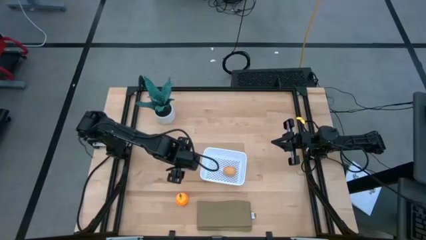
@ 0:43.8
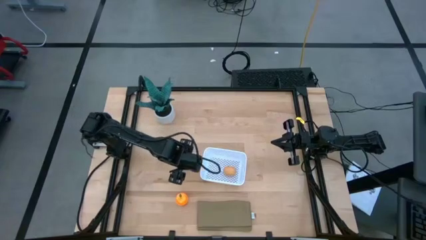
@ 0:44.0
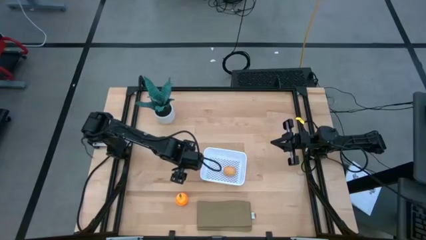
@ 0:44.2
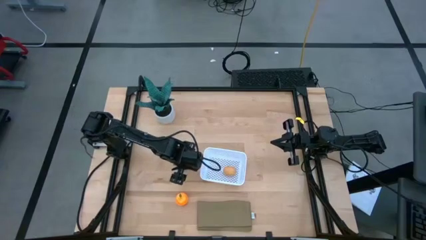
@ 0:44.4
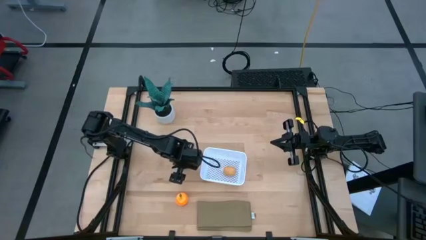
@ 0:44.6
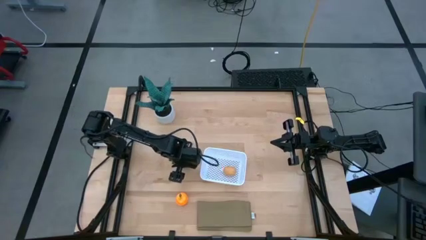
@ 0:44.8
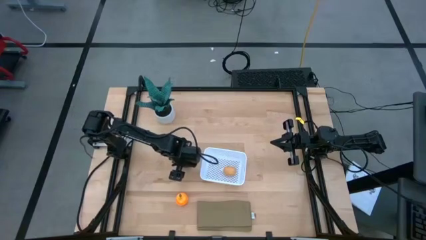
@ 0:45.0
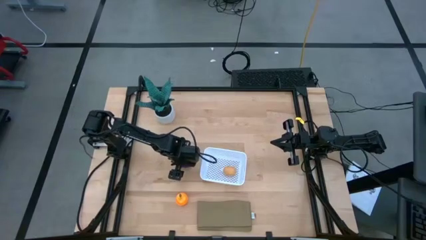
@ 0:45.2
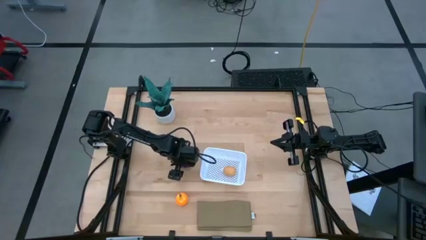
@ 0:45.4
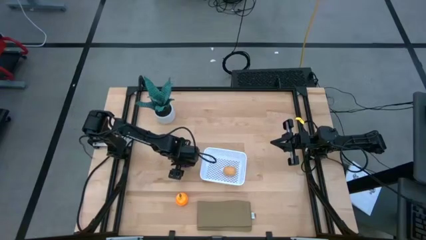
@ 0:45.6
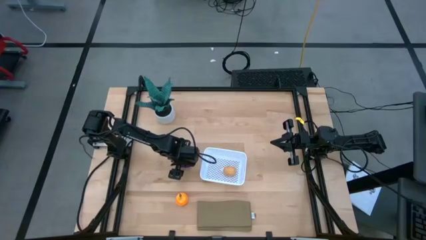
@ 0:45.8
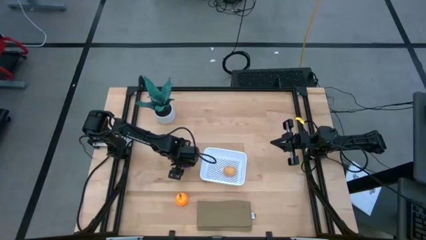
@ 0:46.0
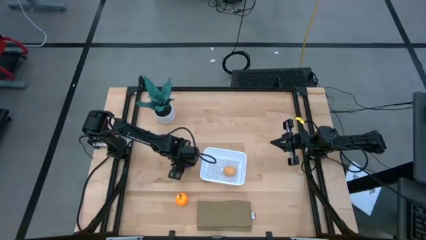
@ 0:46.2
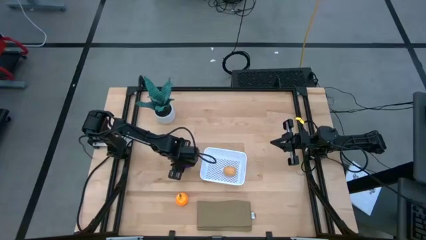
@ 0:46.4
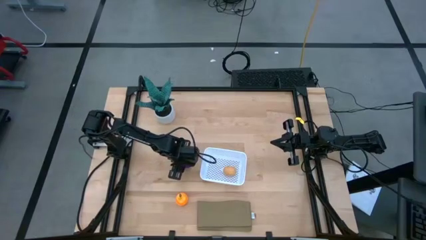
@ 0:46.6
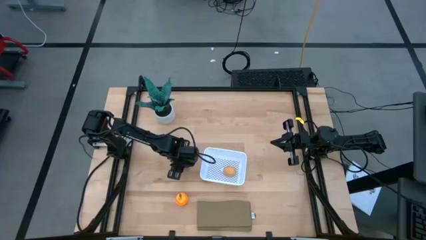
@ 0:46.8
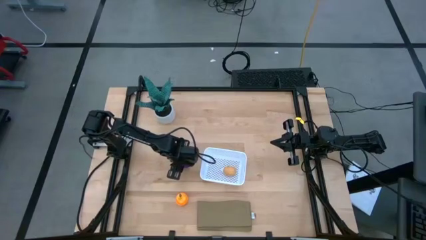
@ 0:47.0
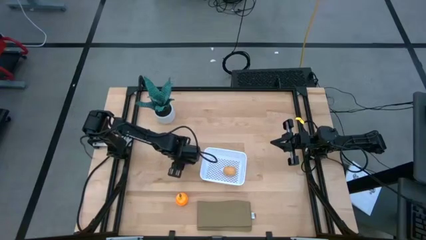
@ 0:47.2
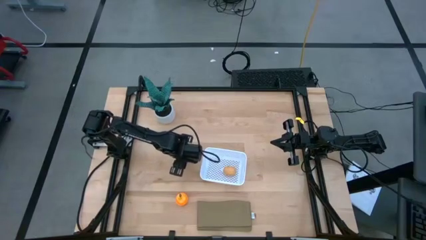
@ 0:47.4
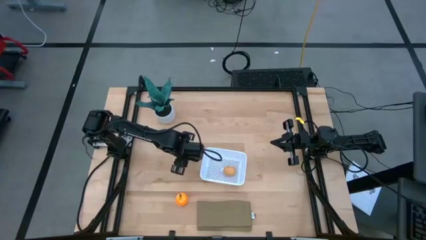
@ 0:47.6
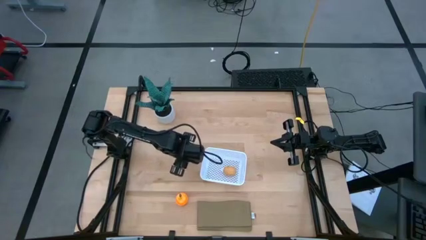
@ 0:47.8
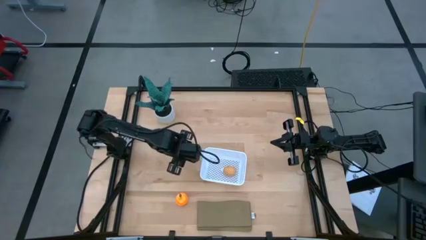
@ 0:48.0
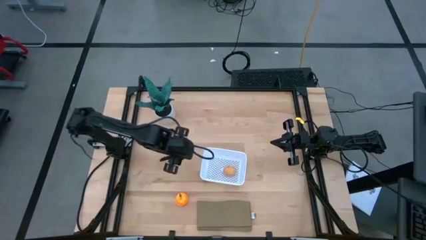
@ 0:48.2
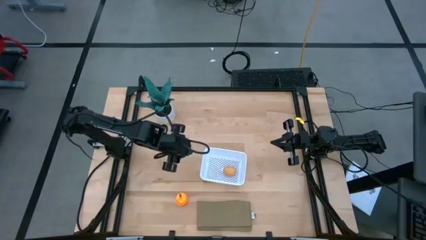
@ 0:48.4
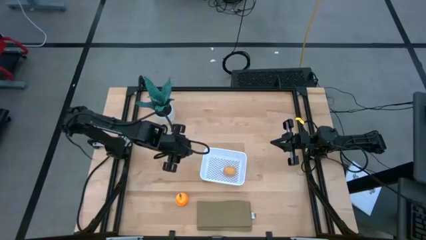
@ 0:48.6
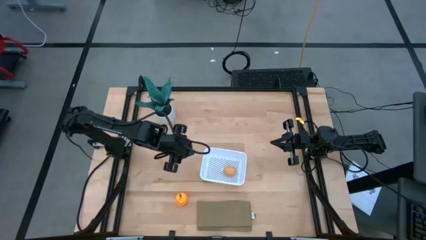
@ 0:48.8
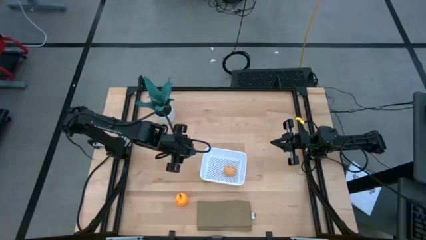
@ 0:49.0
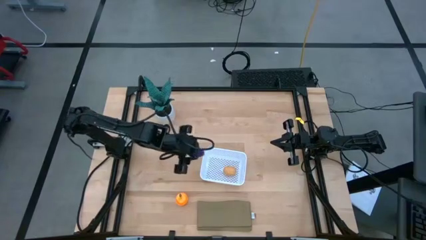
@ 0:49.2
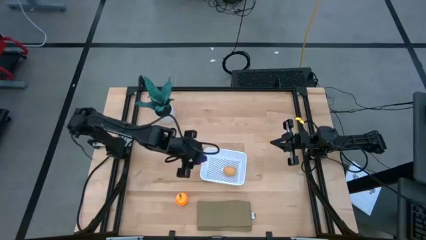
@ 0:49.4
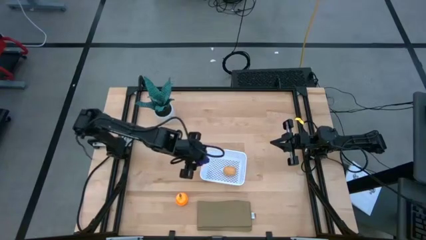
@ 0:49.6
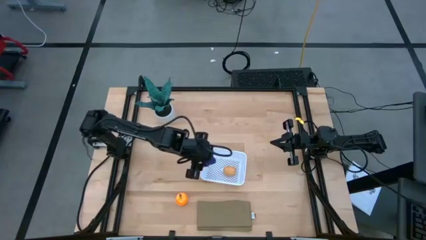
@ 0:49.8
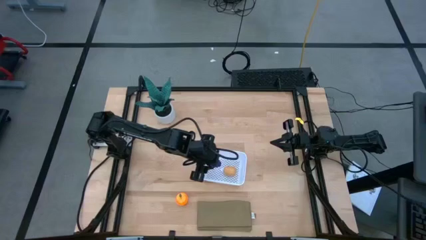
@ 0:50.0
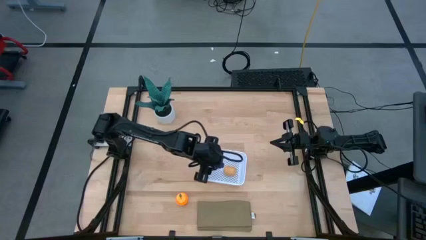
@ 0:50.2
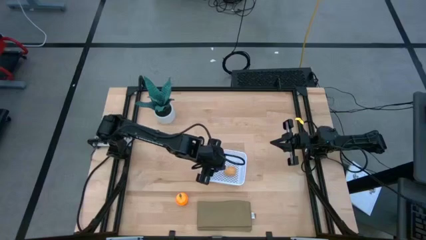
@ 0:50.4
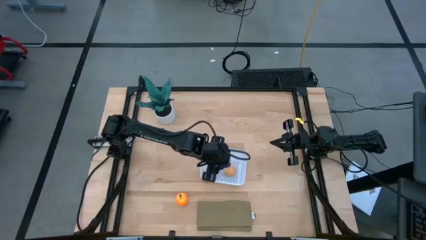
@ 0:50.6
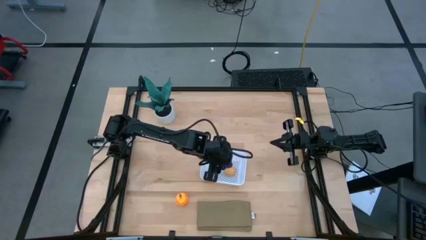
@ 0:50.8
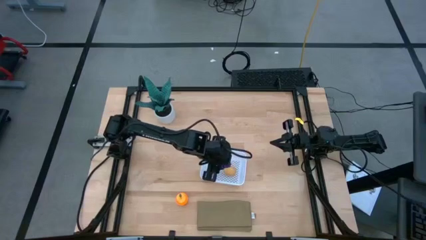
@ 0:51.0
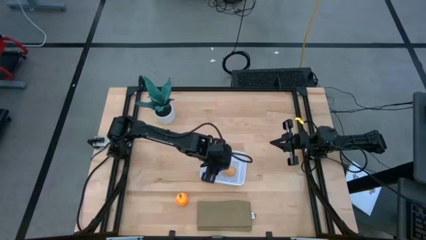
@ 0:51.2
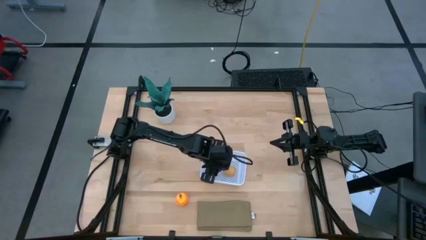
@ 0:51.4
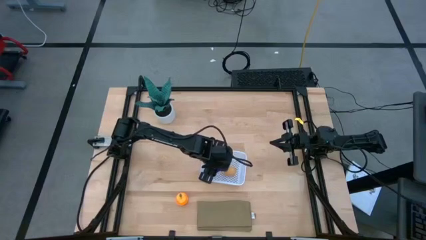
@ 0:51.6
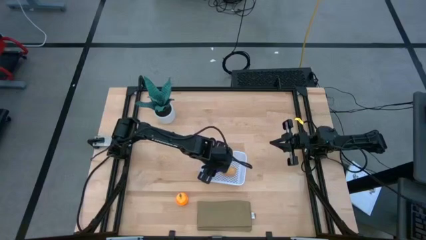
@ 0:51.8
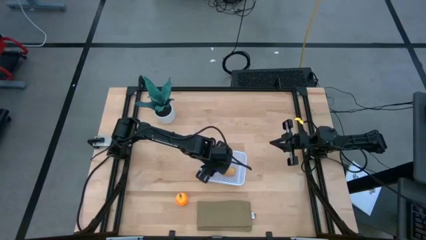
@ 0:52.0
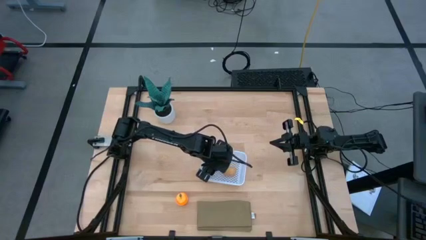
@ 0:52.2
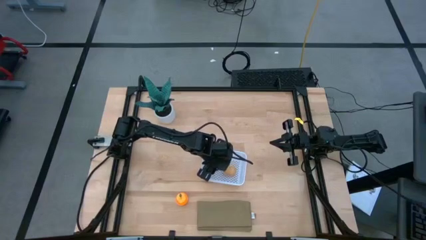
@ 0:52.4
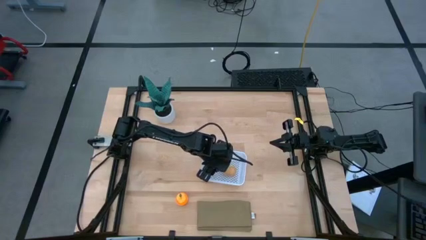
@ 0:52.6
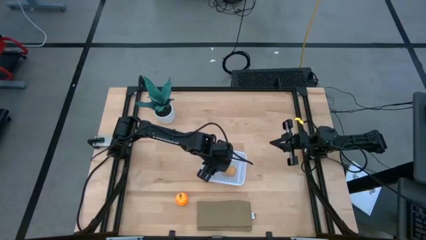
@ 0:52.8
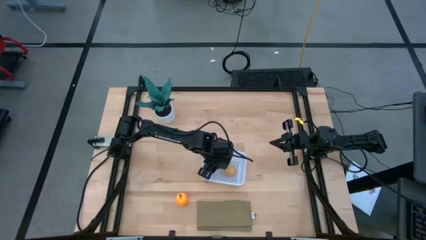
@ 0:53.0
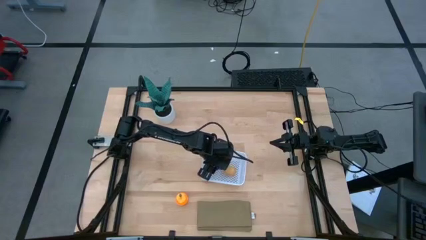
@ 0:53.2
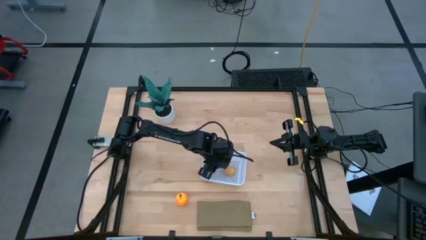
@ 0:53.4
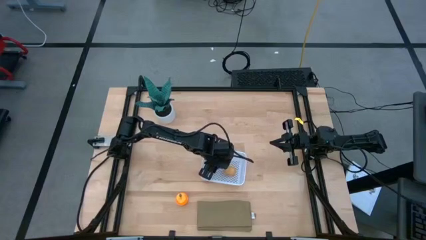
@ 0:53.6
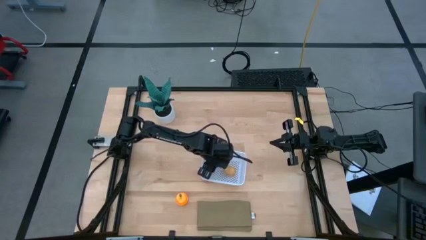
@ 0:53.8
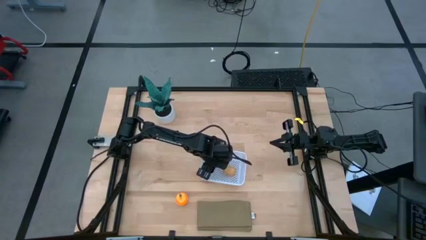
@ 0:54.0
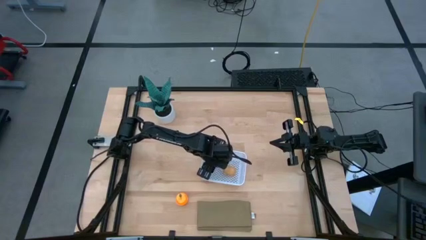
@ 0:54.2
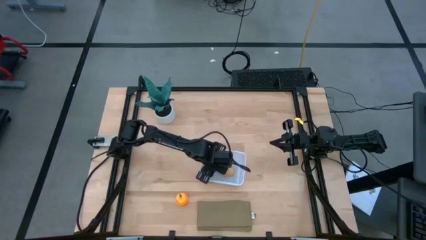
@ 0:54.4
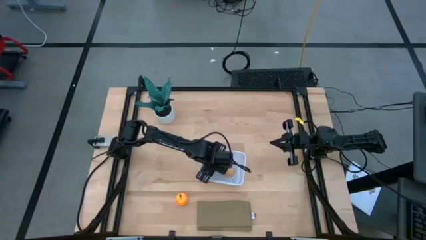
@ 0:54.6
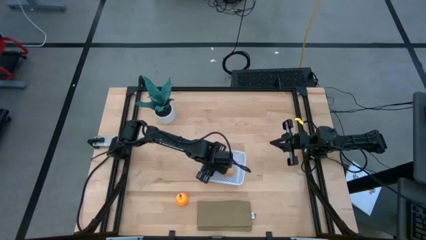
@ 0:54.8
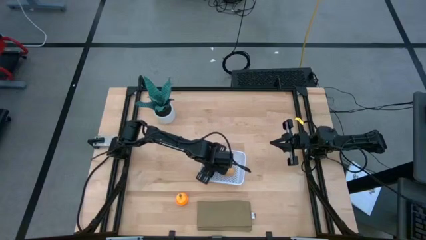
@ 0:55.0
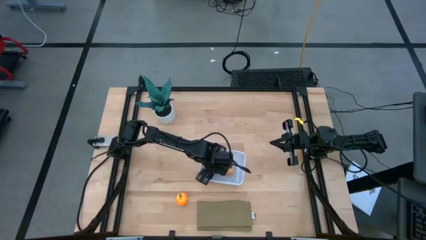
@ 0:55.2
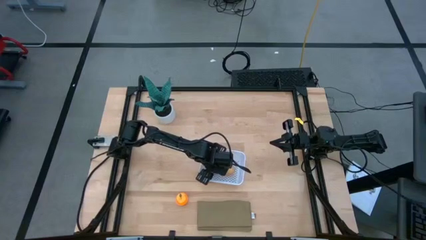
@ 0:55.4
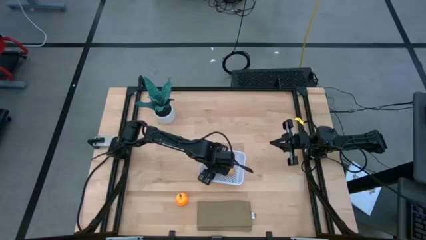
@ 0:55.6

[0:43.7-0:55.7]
Task: Pick and placing Produce into tupperware
Put the grapes into the white basket

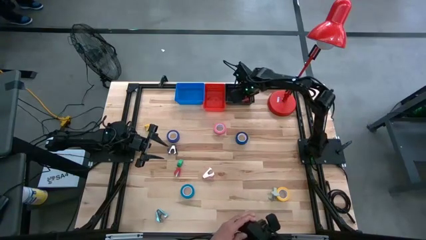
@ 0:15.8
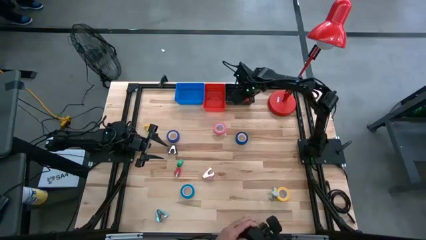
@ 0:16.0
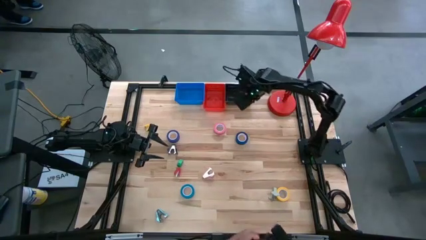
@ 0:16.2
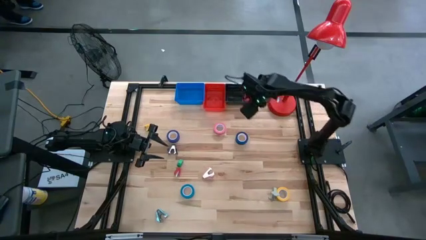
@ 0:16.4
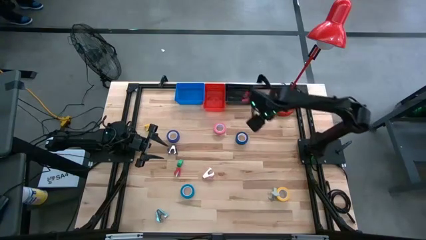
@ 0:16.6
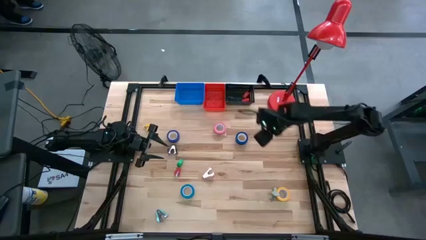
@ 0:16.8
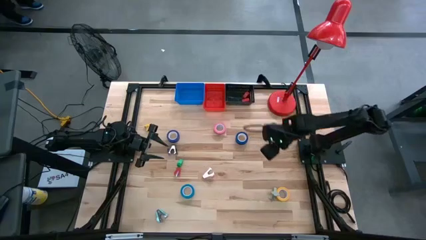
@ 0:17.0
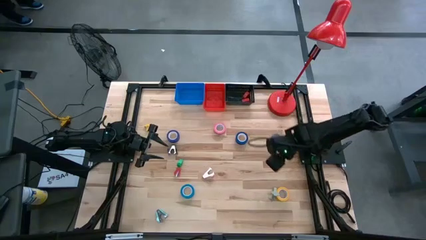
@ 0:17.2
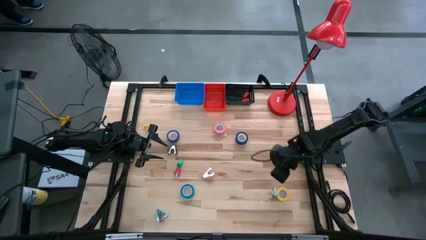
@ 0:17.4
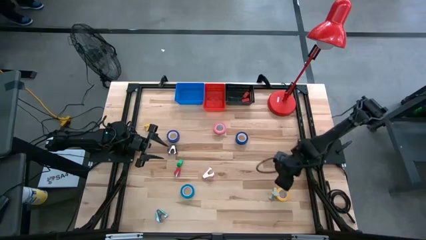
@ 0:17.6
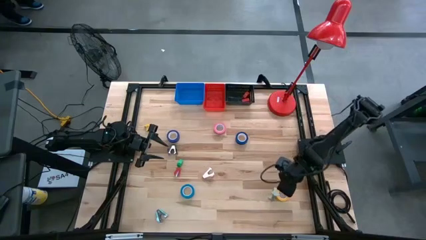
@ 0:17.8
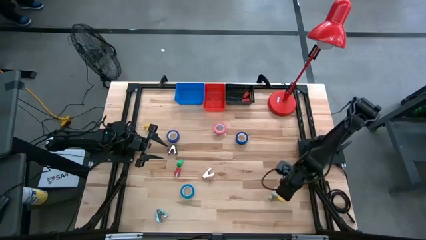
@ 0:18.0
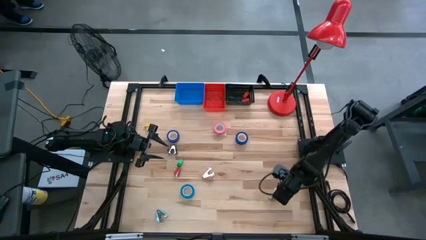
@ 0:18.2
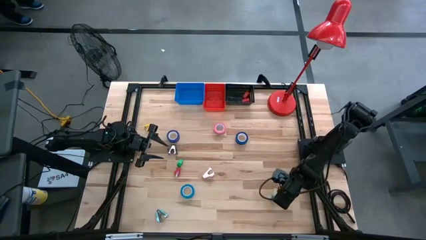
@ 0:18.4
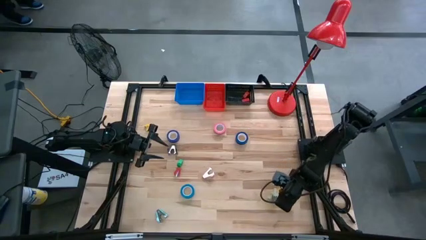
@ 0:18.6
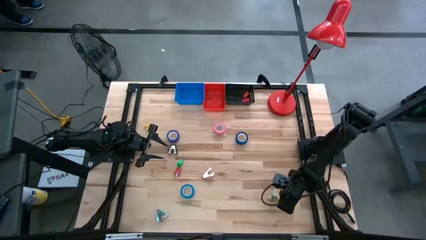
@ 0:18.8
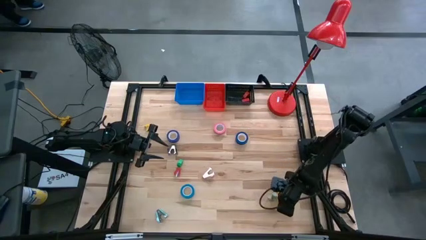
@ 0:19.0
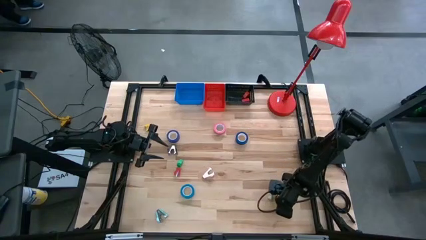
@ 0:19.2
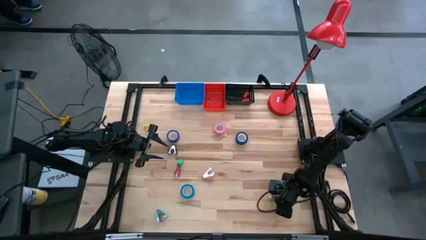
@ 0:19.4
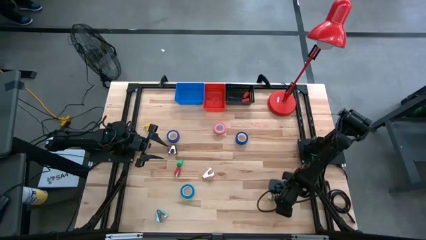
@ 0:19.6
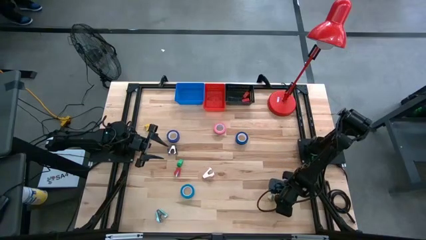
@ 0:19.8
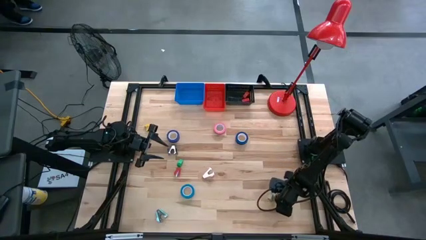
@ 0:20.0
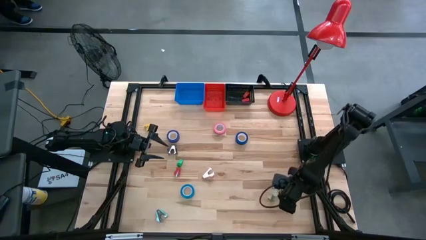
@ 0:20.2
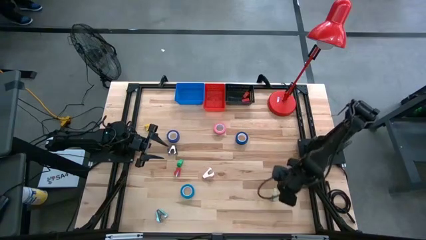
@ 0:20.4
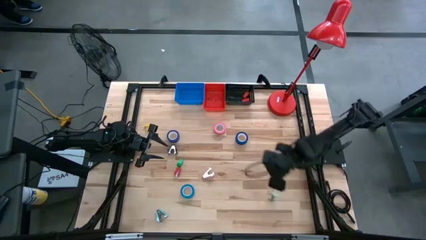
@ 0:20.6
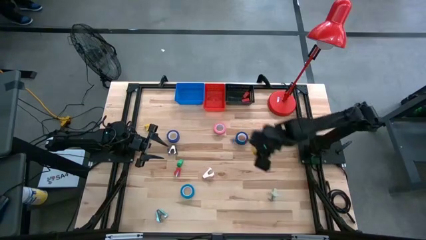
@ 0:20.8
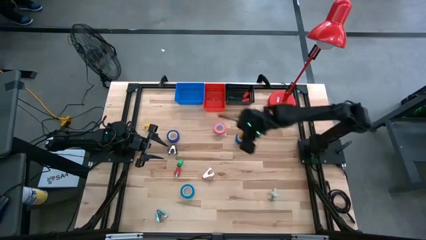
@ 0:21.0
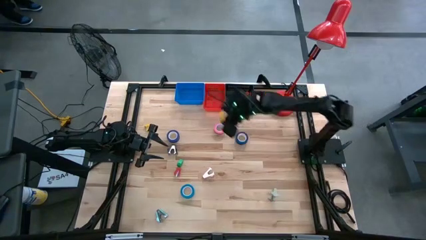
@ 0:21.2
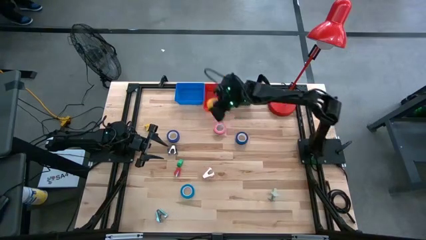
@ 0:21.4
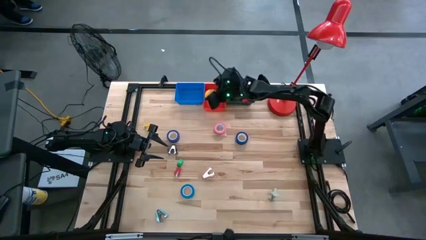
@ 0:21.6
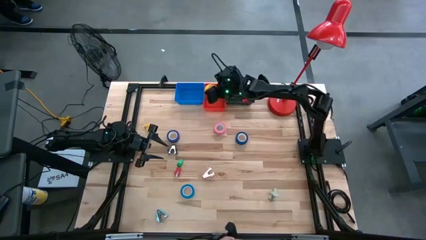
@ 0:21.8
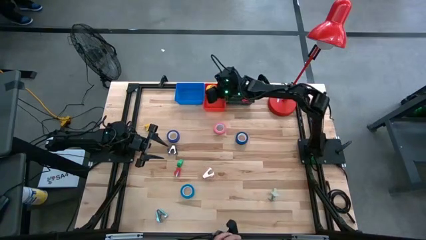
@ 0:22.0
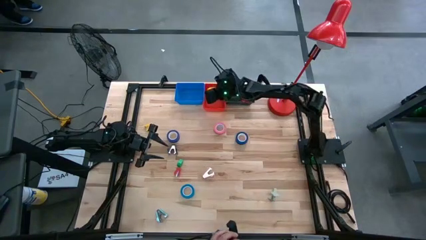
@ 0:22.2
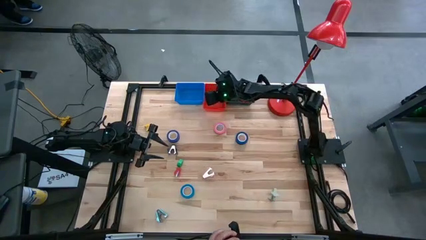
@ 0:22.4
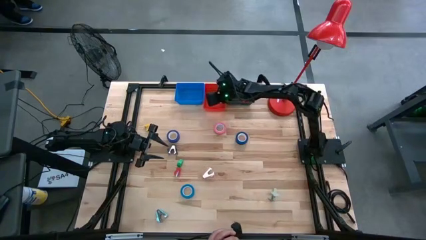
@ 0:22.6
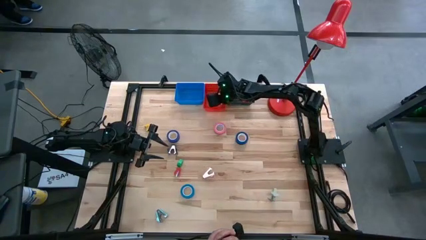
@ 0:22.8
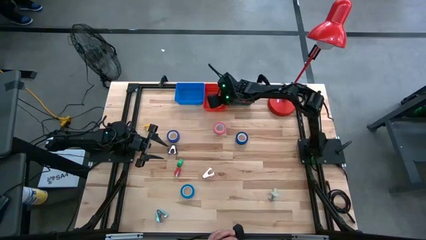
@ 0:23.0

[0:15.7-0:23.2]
Task: Pick and place Stapler, Stapler remover, tape
Put the yellow tape into the red basket
